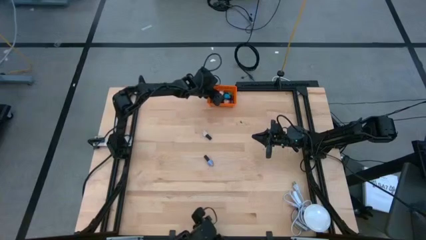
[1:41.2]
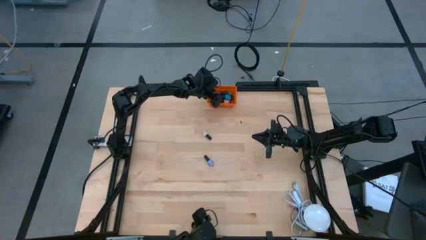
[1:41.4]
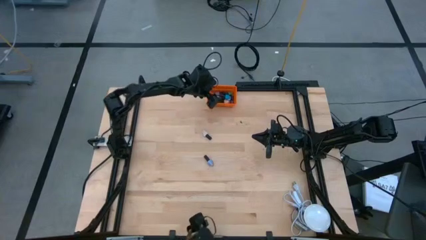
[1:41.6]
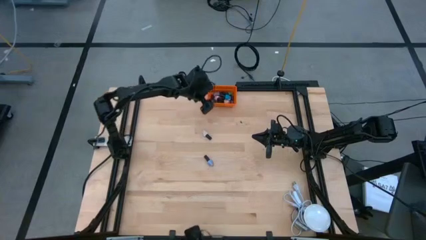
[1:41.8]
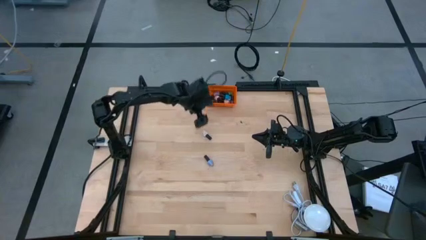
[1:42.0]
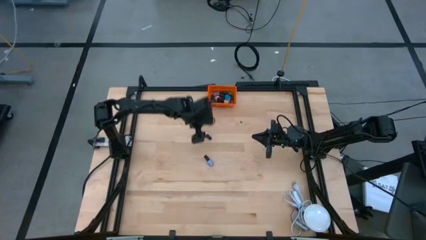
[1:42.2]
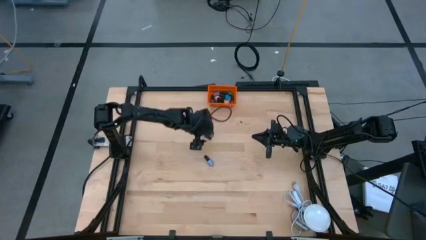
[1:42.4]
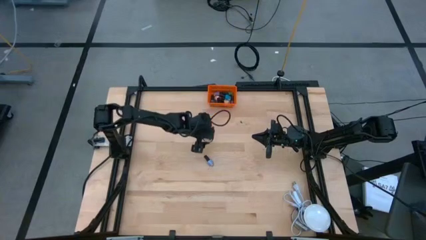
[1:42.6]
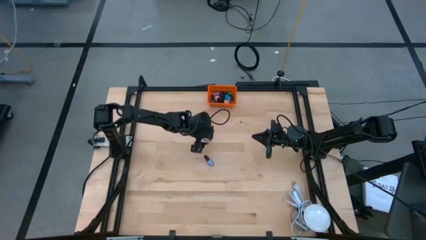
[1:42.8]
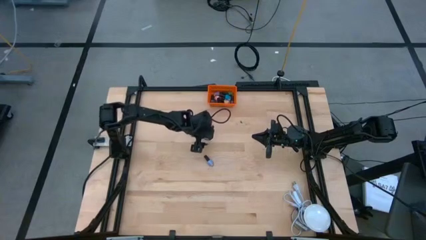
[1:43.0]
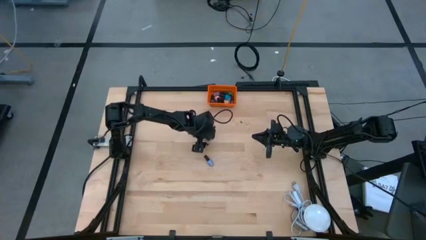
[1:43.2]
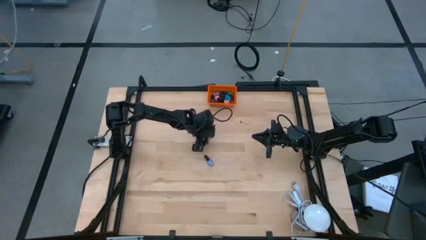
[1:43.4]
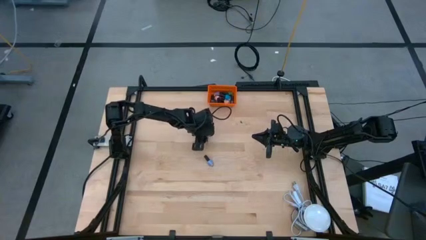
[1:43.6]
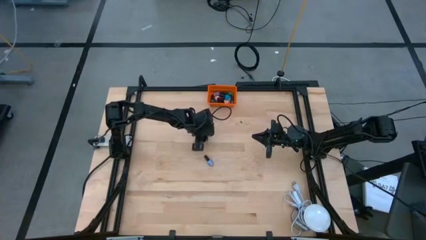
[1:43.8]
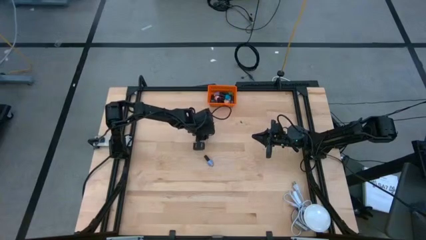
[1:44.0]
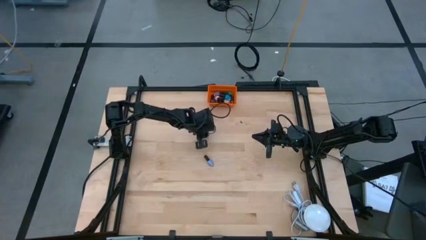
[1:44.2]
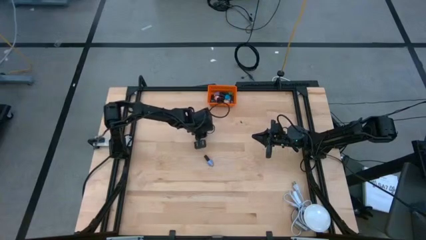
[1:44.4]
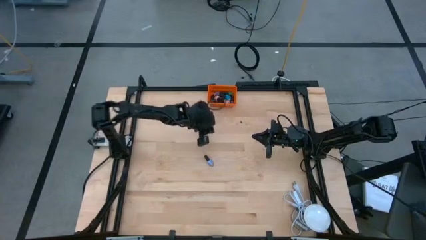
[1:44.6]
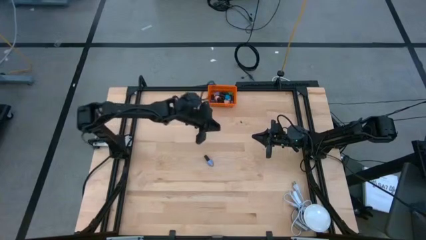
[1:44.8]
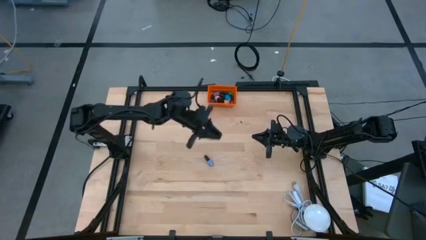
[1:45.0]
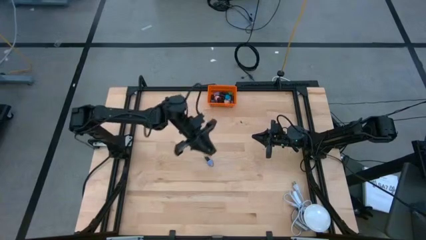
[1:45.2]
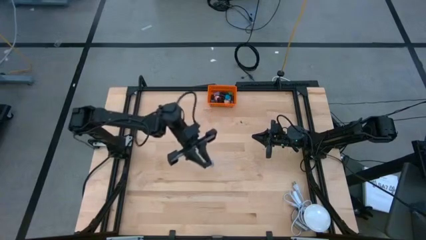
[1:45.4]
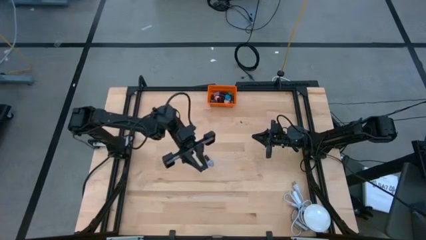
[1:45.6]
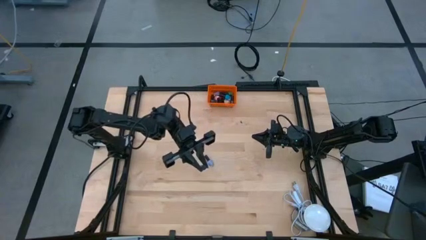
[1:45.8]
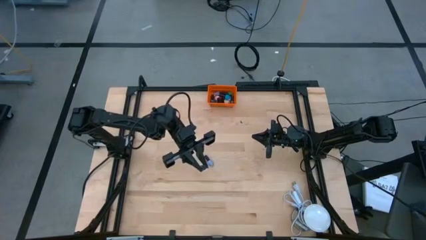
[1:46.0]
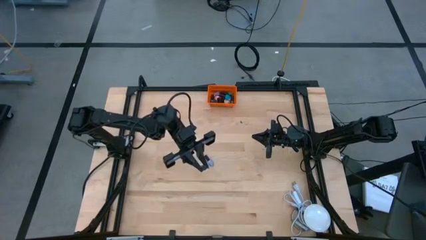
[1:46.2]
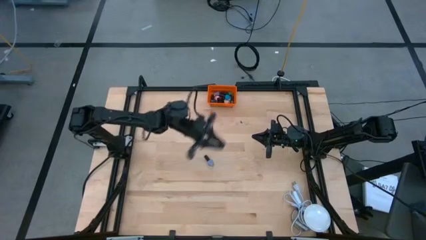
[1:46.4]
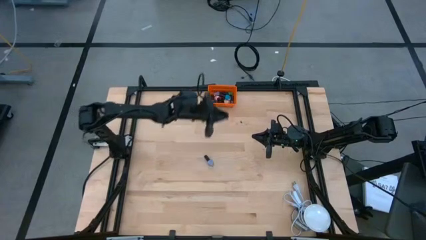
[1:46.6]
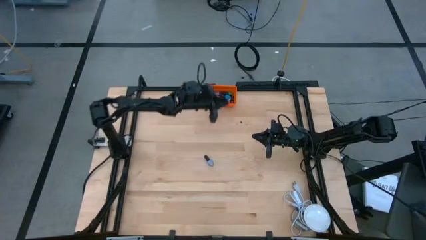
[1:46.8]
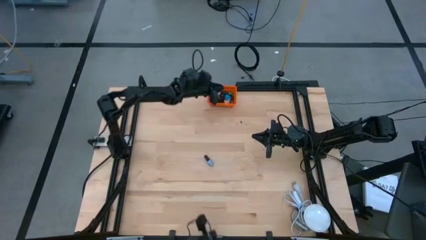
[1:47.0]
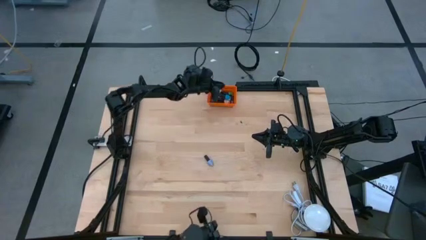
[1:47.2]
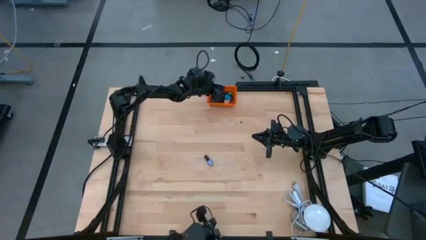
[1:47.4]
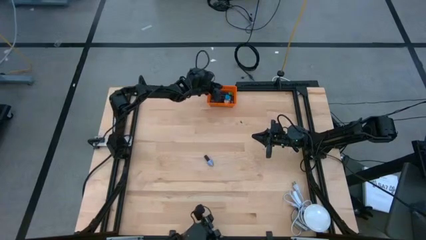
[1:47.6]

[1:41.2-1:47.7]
Task: Pick & Place Nail Polish
Put the white nail polish bottle into the basket

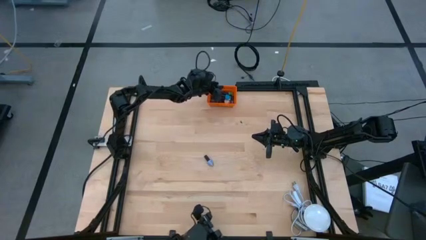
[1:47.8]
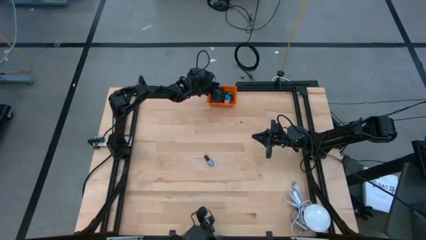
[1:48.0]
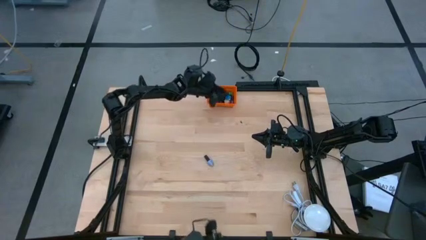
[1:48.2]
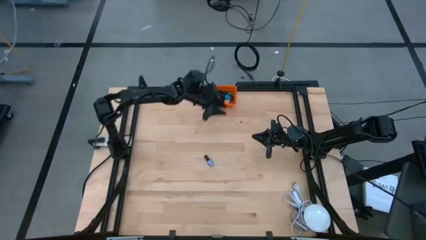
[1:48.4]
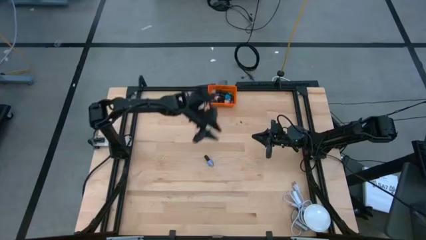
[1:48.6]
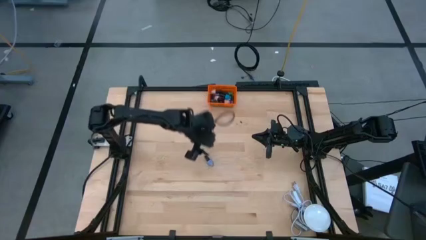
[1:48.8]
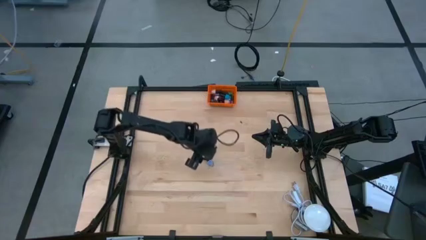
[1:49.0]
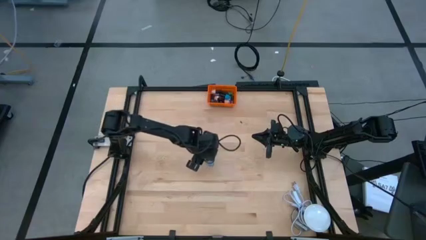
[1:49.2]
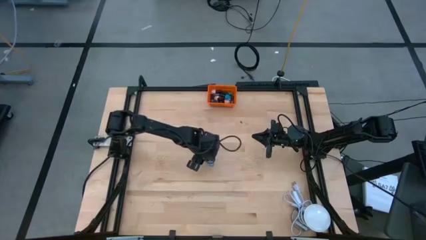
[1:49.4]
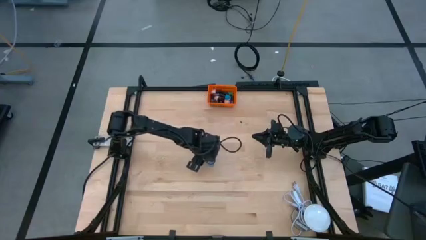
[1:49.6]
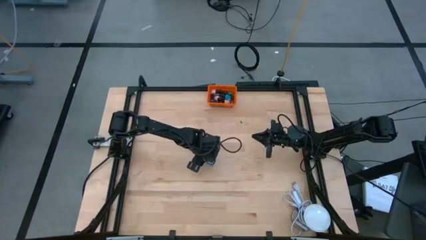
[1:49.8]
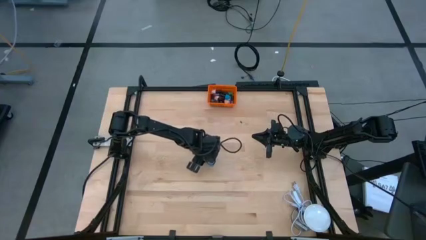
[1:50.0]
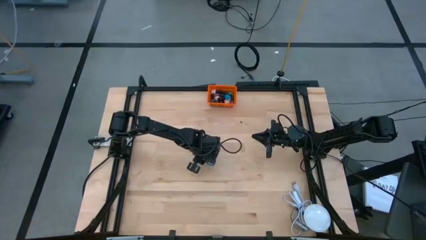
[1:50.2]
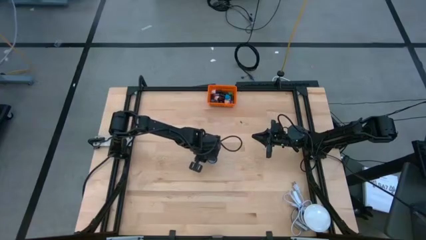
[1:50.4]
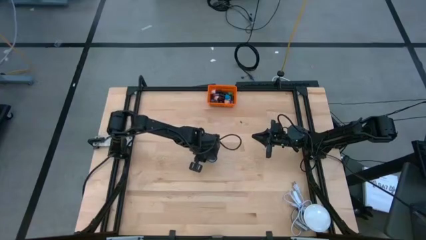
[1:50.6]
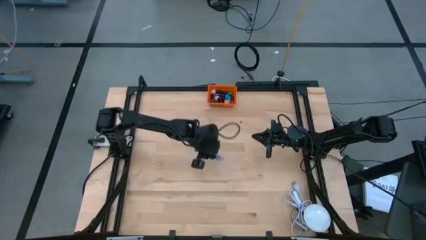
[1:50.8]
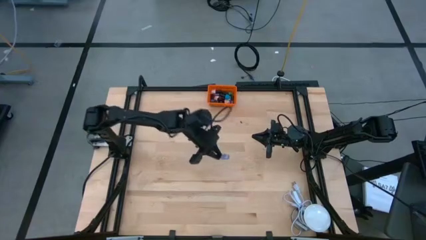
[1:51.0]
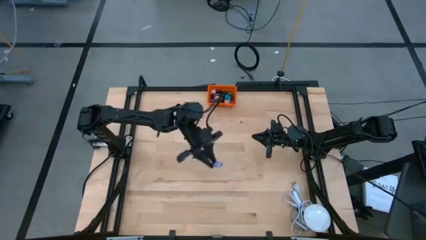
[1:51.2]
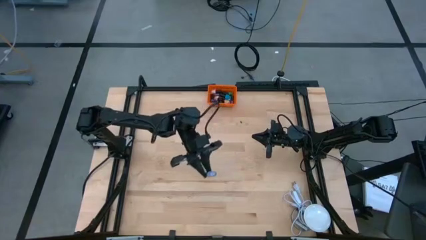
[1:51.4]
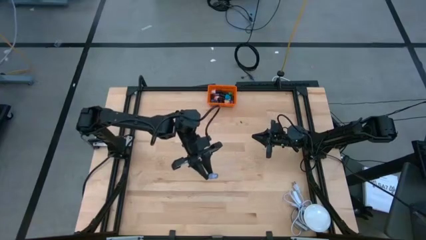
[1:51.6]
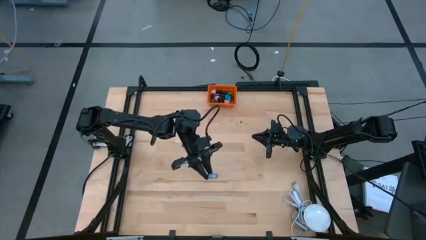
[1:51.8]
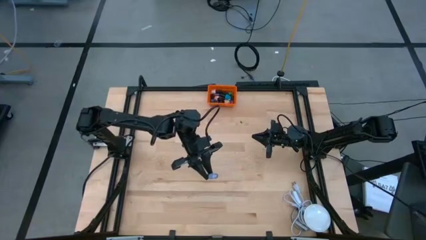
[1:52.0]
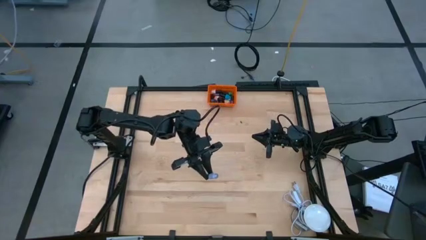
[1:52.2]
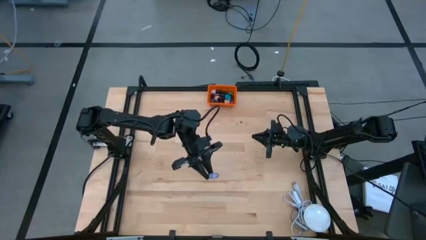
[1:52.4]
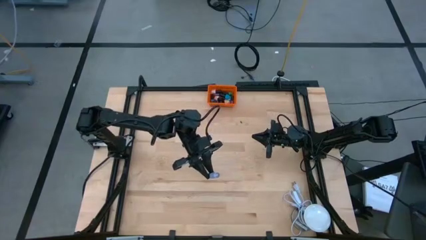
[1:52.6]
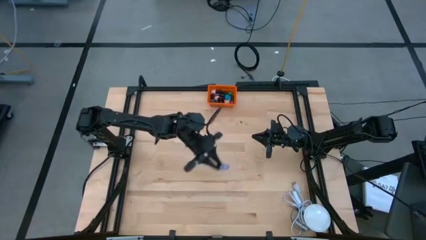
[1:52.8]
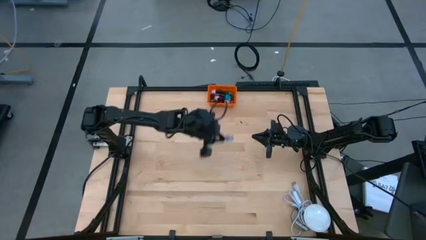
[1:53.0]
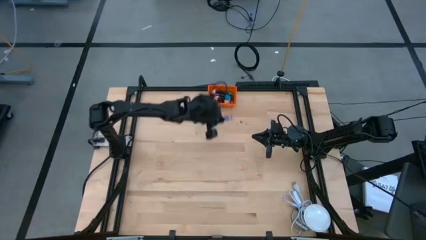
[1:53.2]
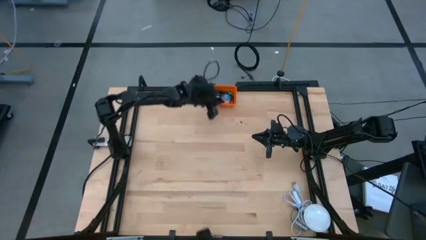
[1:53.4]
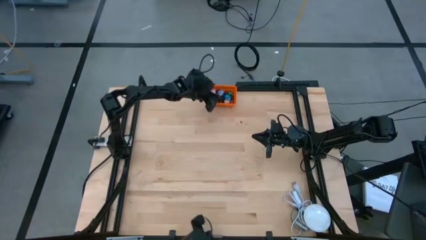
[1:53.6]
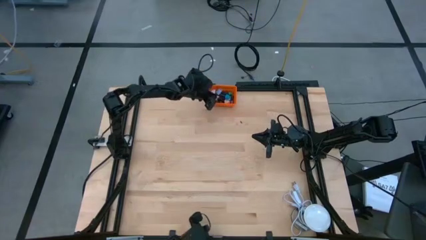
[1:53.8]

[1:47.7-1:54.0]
Put the light blue nail polish bottle into the basket
